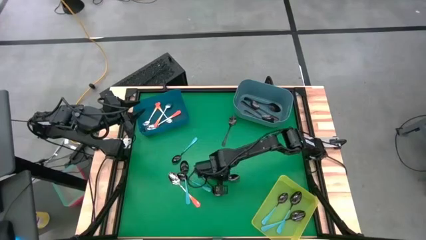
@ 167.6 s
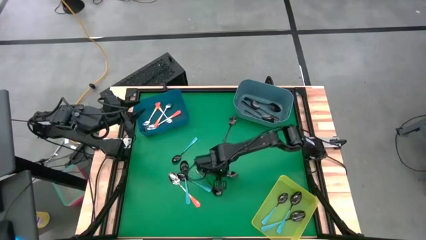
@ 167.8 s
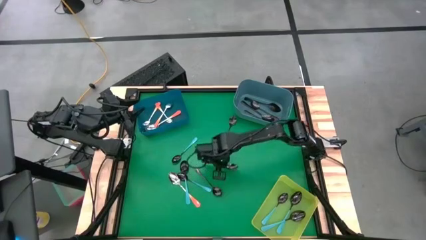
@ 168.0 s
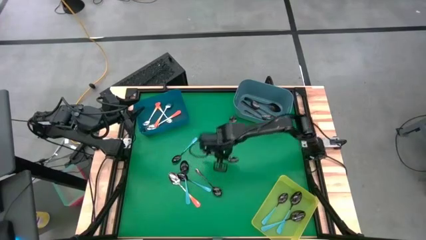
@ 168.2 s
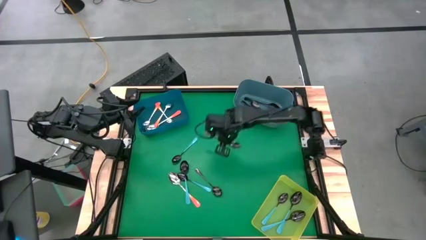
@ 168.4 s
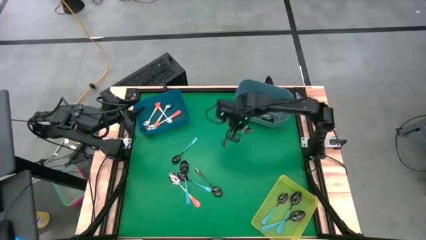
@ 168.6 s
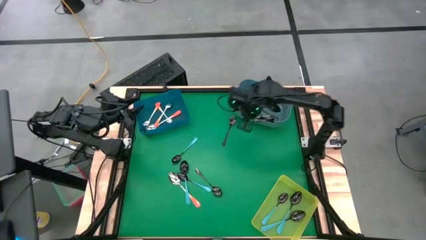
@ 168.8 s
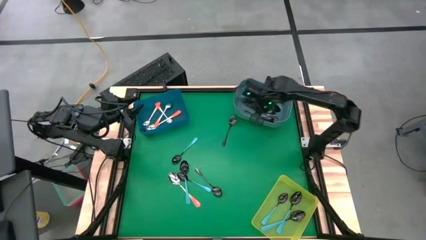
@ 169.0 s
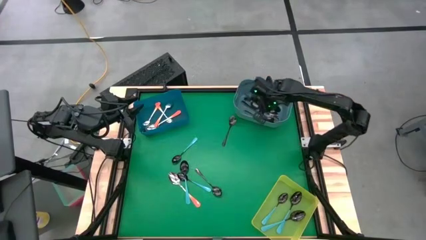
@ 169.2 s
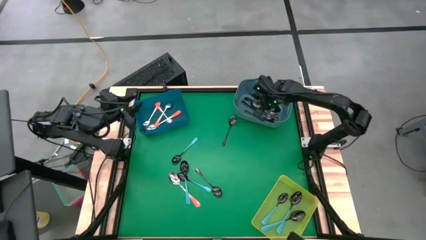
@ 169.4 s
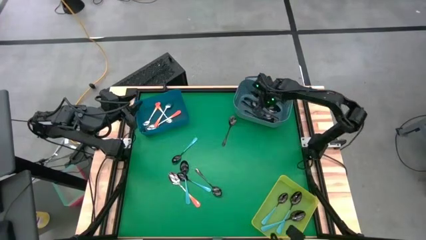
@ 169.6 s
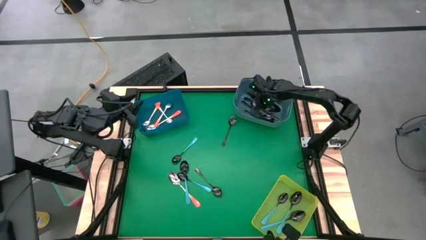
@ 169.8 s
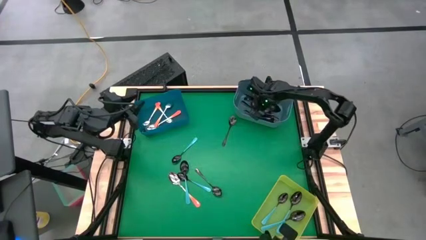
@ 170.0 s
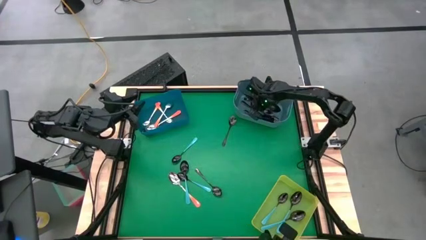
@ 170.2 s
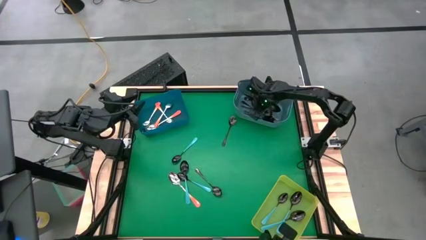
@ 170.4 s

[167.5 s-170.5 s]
Task: Sort silverware by color (type)
Put the black spoon into the blue bin

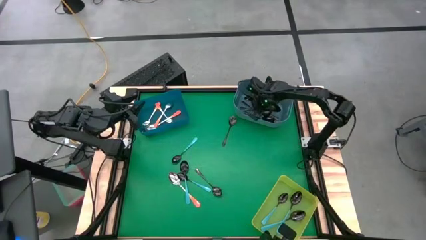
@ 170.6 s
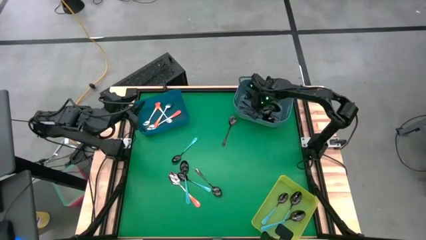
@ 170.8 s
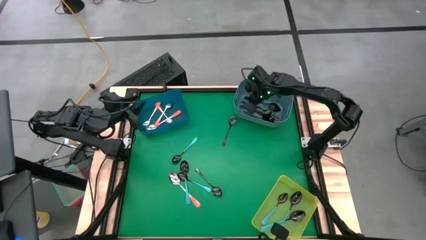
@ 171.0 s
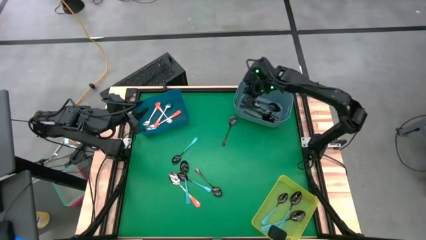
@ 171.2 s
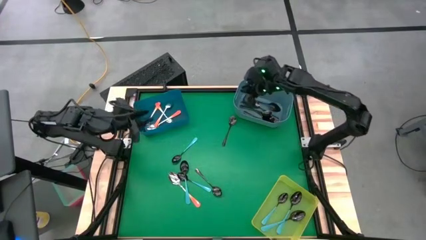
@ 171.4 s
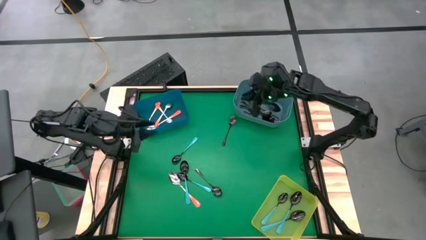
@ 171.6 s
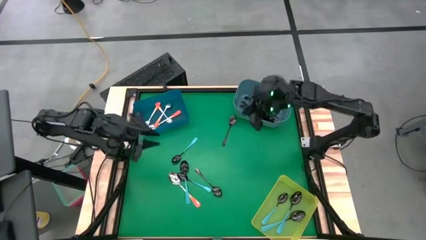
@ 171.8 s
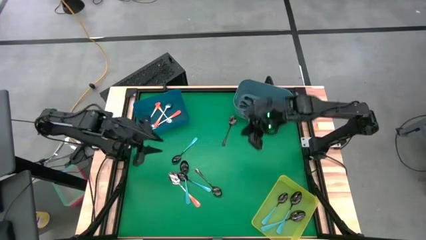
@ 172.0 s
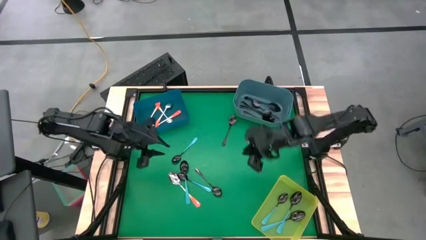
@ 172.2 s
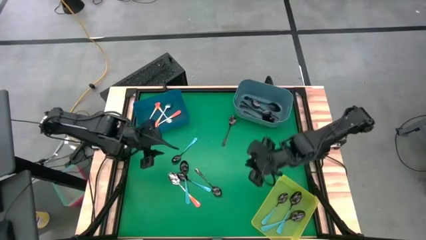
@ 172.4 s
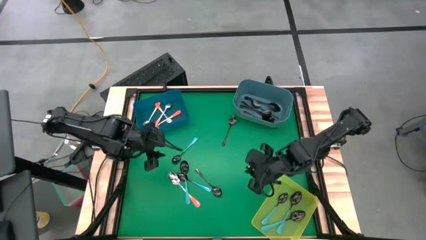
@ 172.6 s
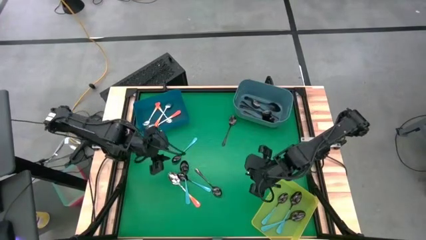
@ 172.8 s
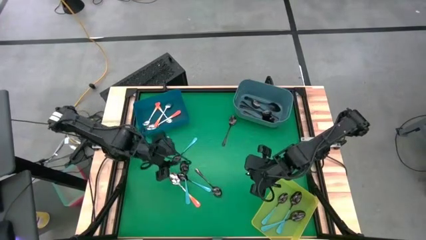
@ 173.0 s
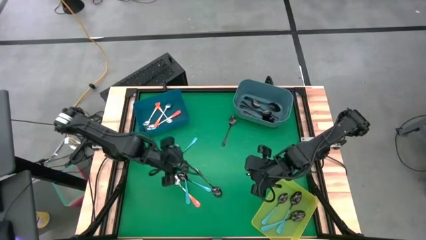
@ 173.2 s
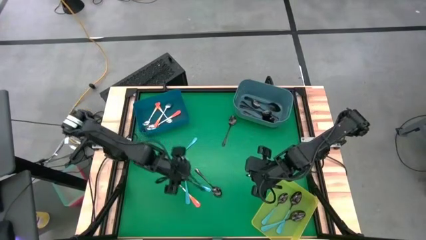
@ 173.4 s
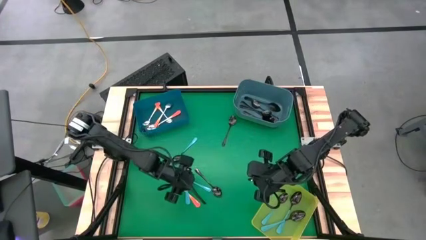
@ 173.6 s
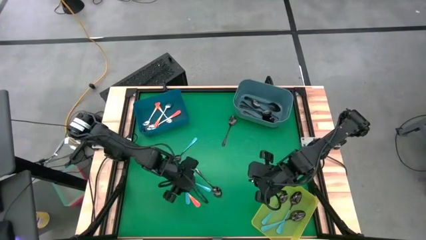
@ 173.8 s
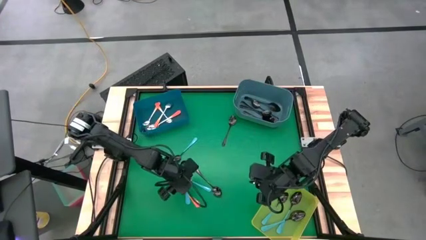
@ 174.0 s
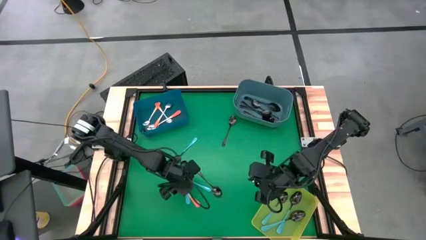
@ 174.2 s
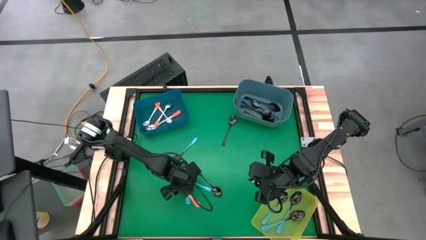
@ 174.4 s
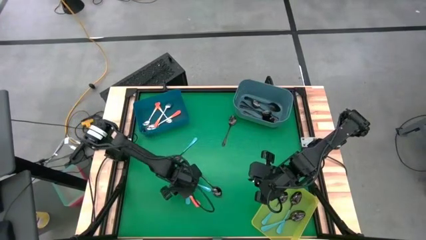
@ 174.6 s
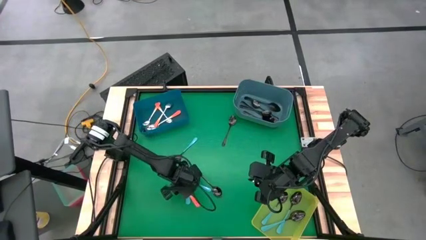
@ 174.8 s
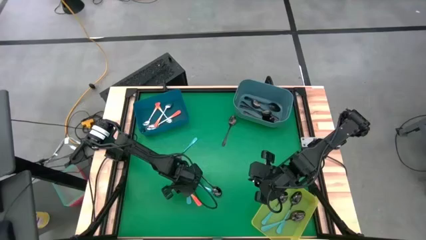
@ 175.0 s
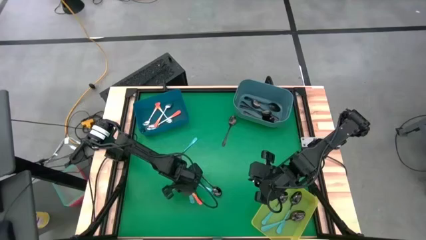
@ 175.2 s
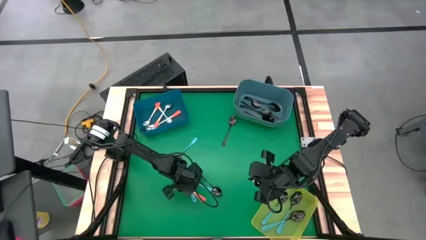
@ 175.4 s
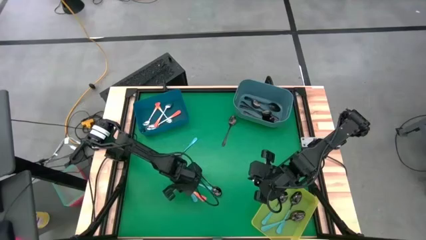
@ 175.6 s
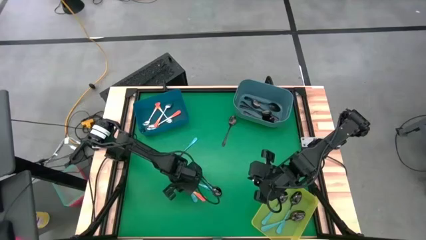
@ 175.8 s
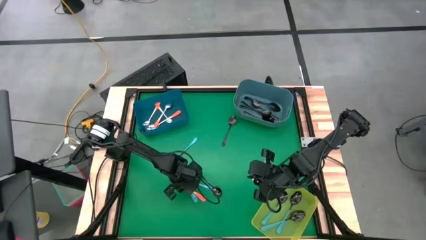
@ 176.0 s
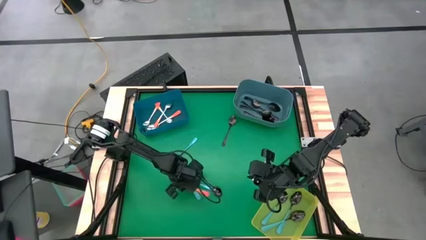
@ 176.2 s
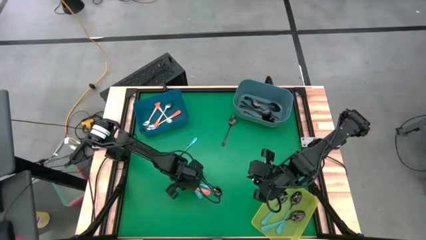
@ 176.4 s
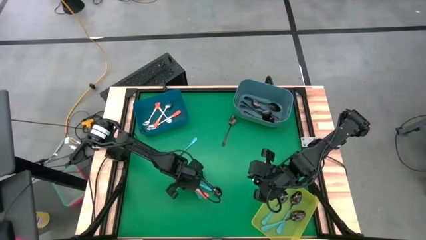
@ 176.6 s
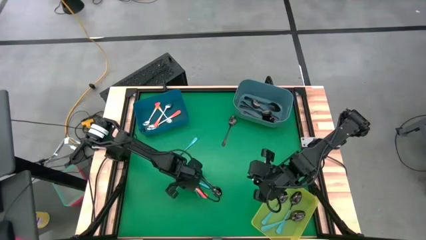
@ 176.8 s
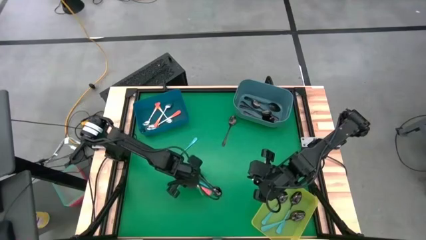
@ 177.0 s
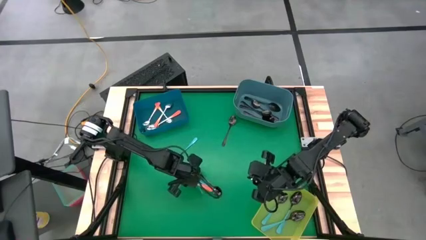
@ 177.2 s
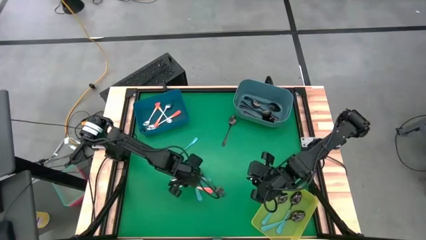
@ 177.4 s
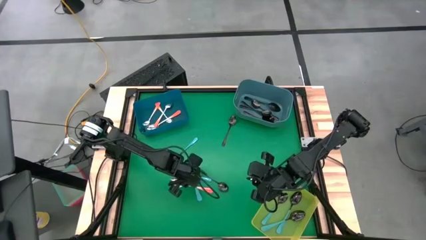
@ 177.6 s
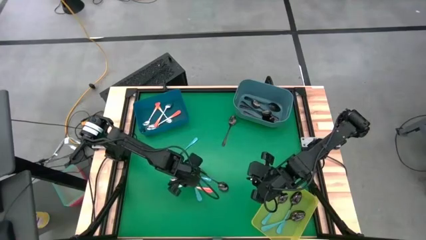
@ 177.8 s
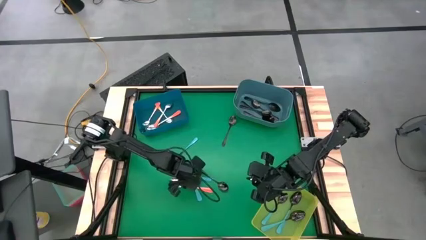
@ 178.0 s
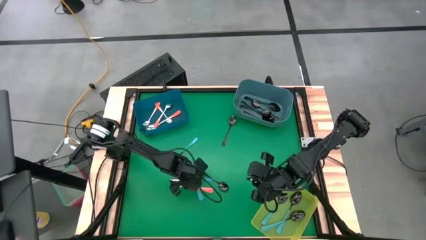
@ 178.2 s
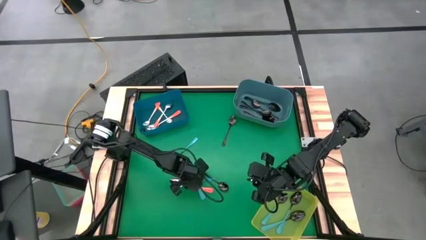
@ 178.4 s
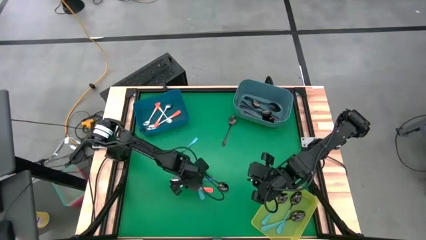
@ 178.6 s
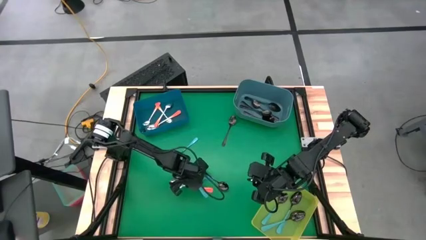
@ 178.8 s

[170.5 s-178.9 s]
Put the blue spoon into the yellow bin
